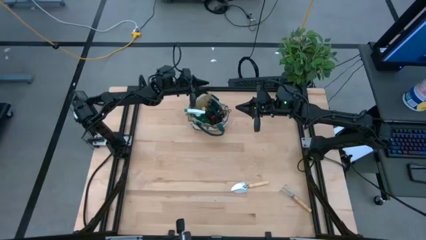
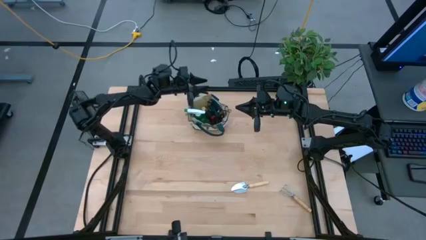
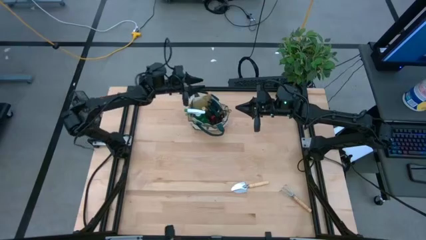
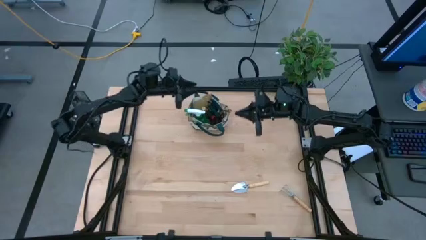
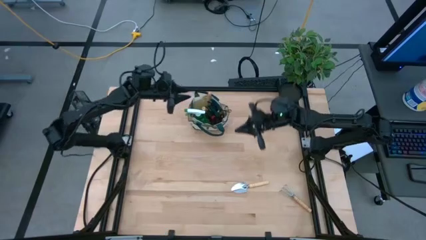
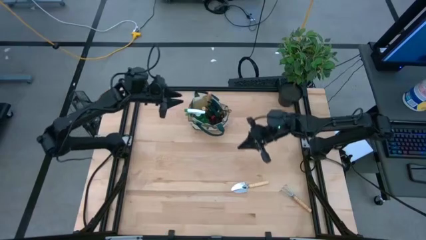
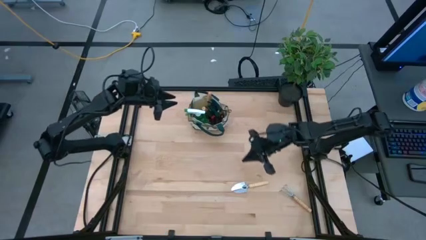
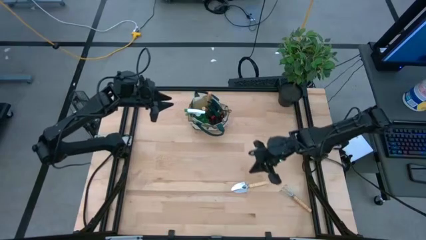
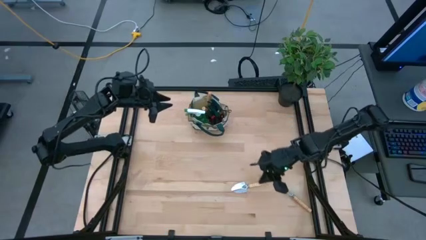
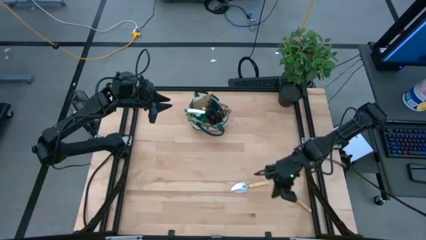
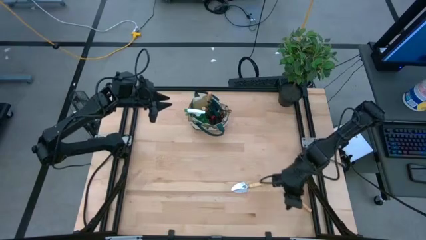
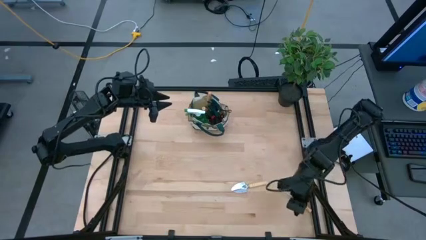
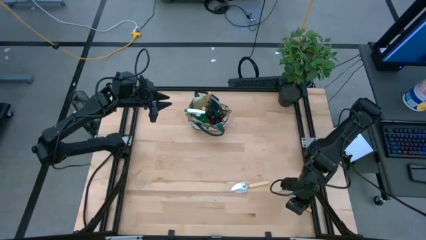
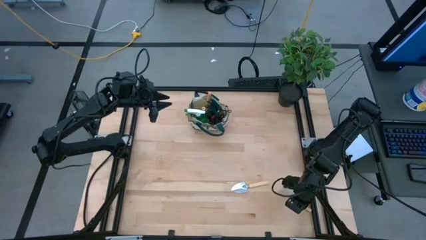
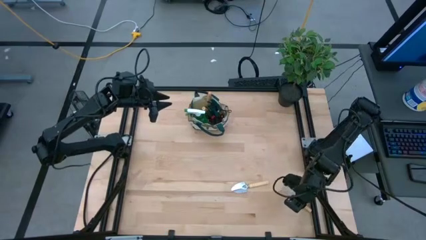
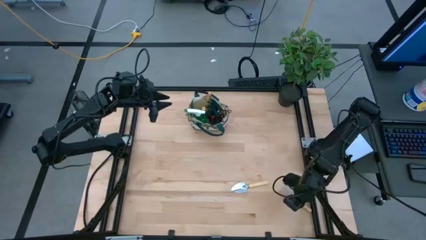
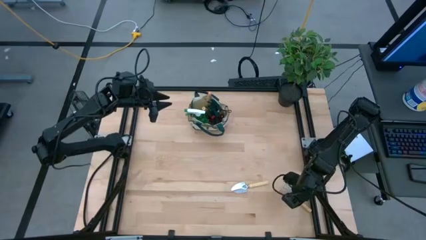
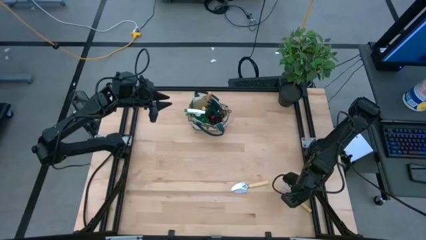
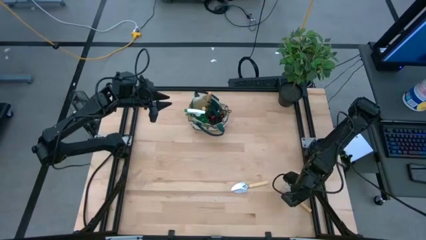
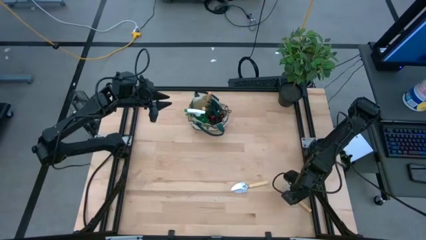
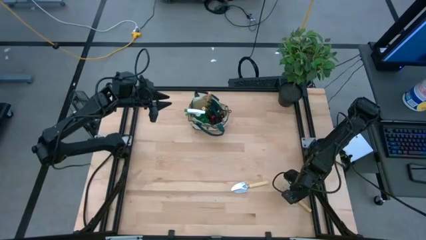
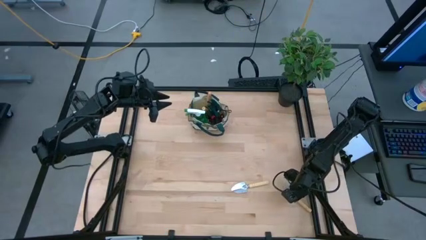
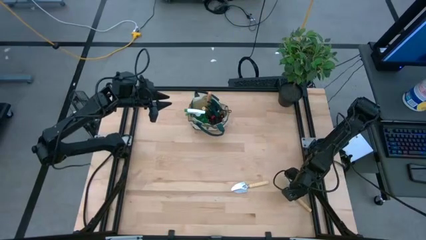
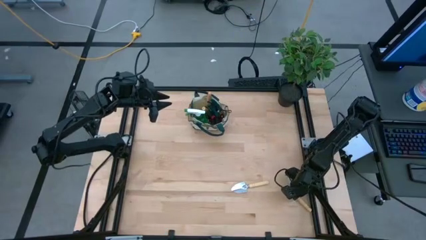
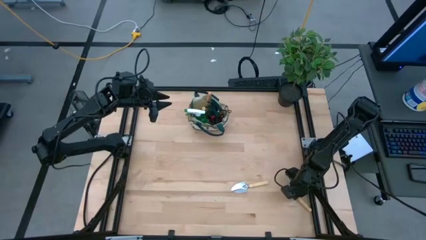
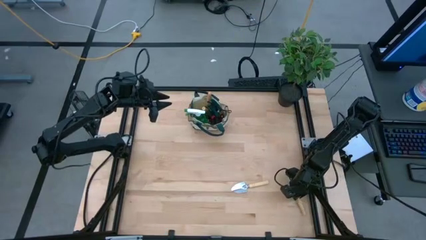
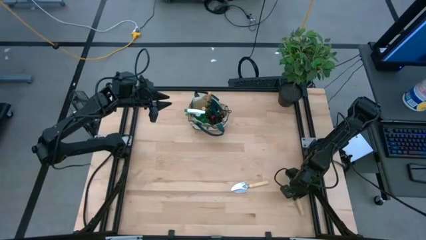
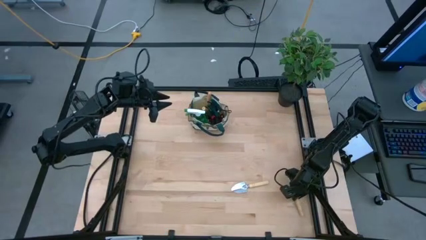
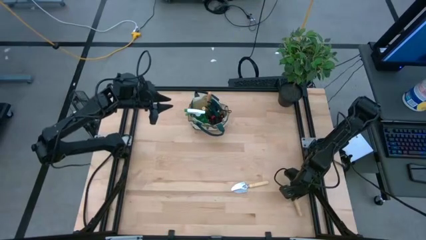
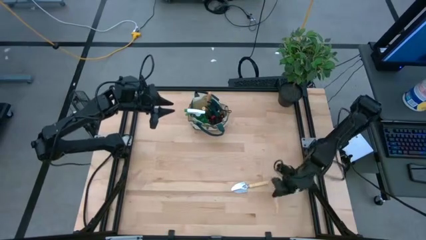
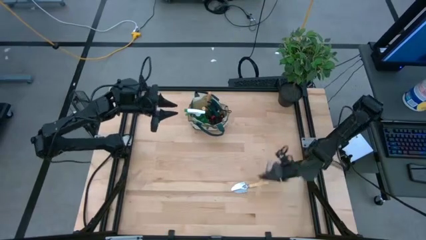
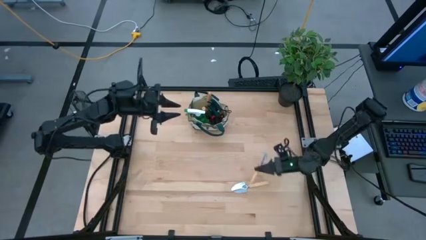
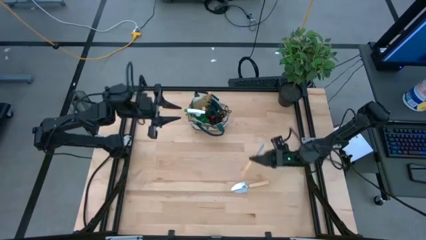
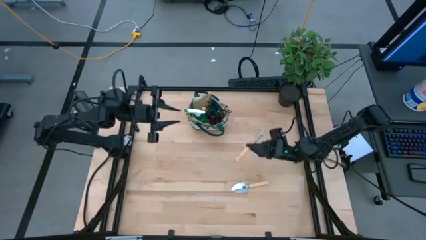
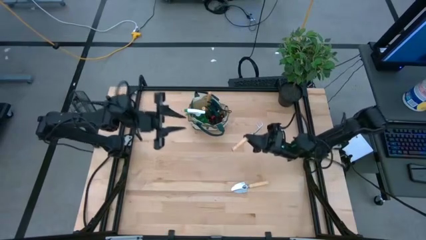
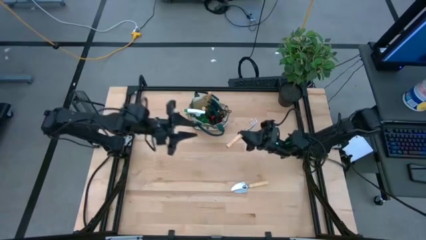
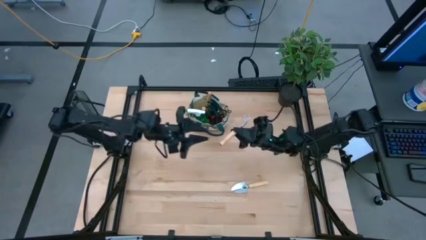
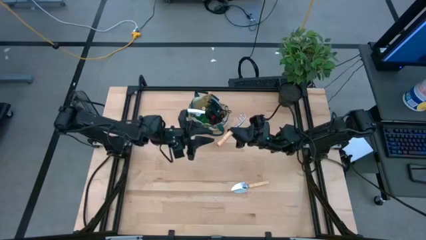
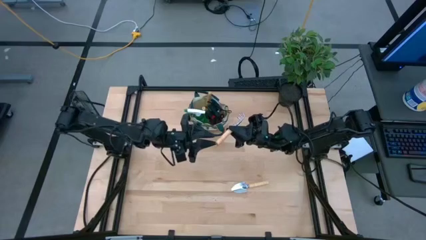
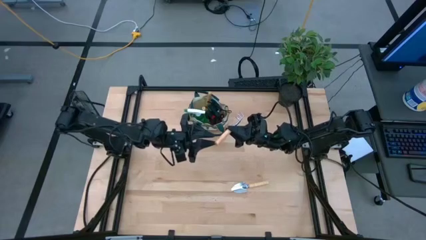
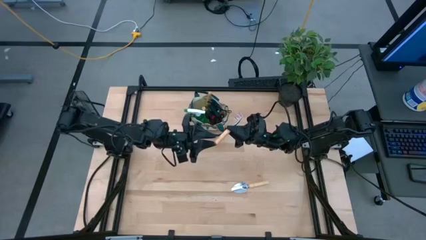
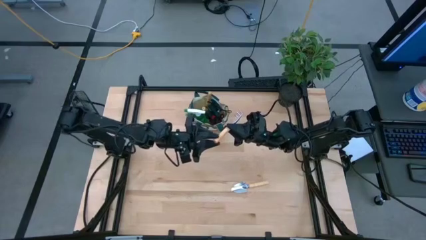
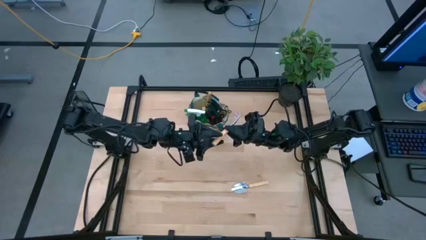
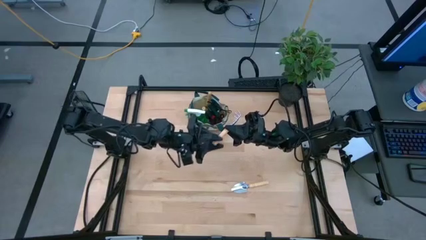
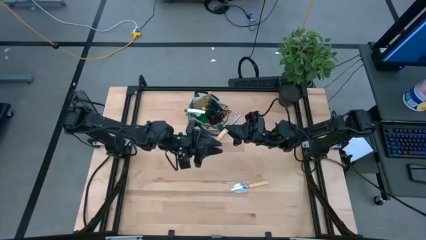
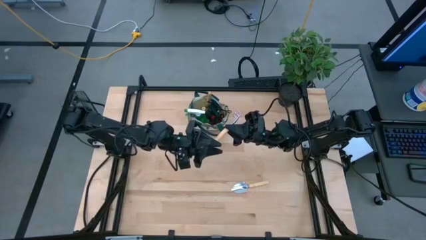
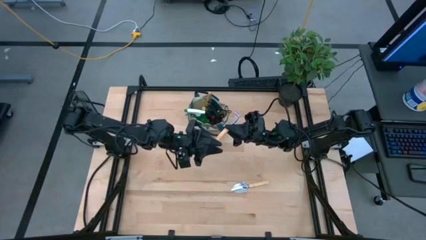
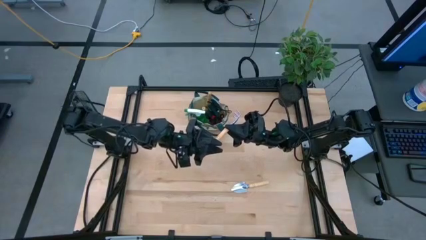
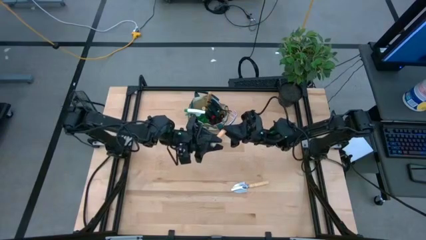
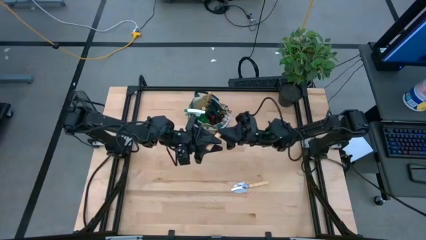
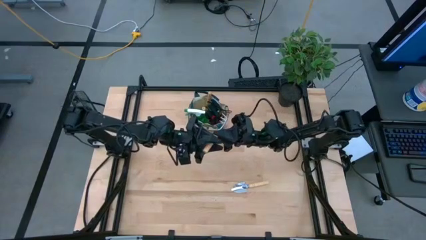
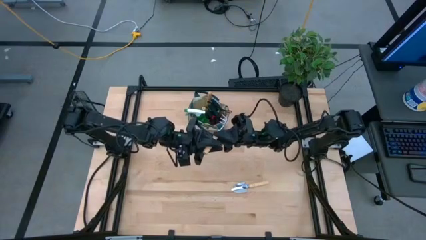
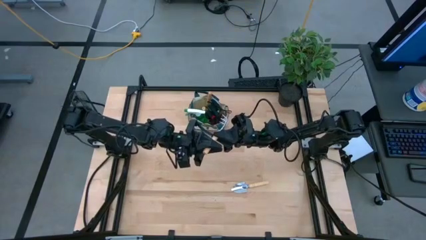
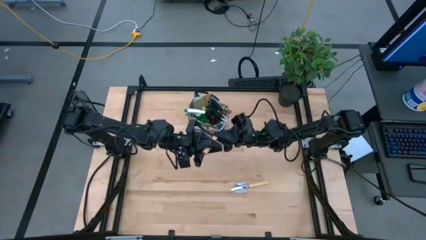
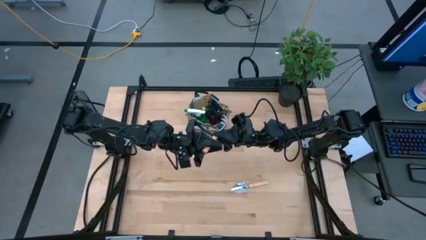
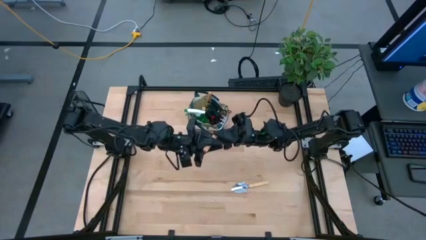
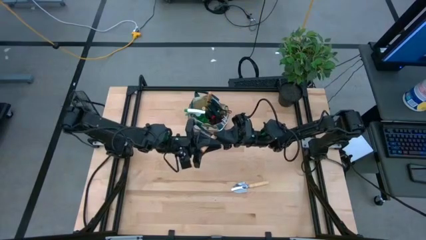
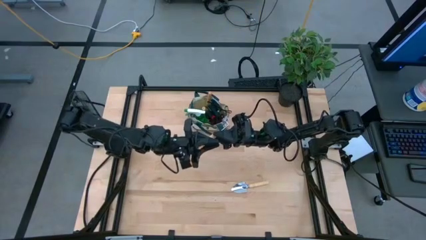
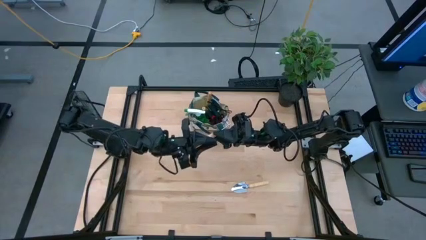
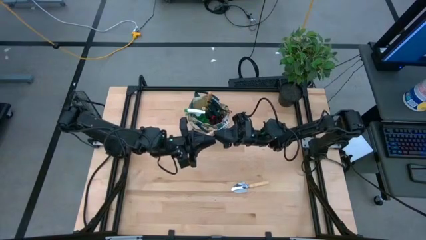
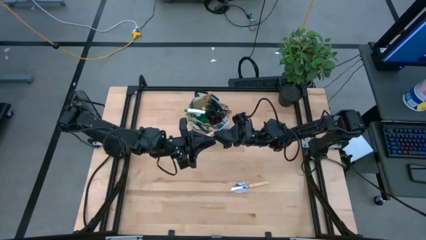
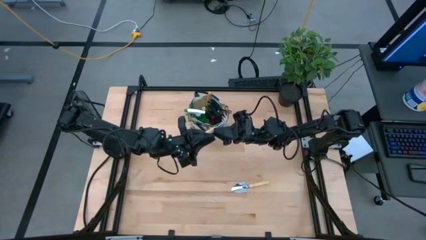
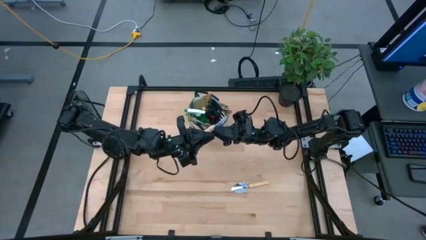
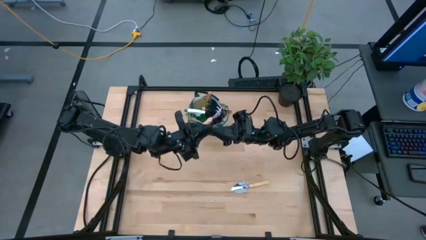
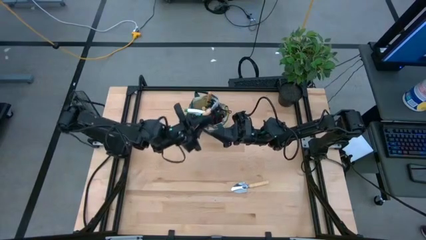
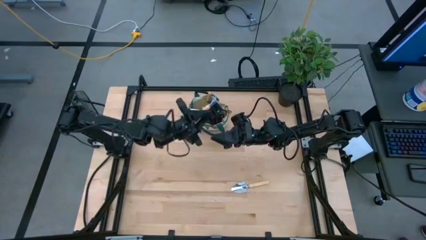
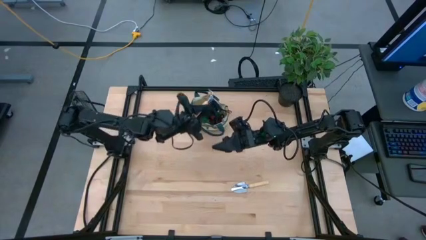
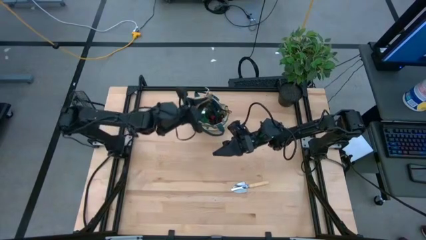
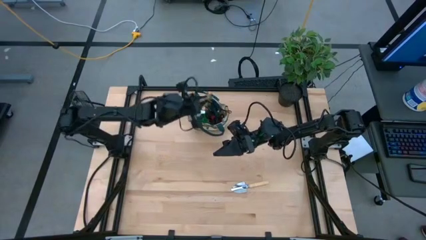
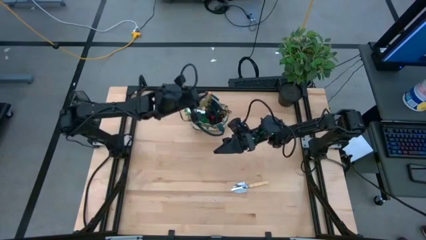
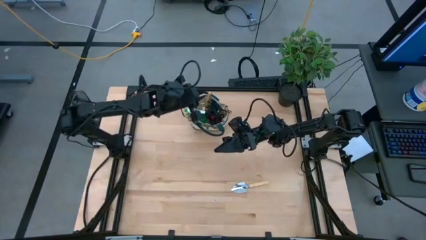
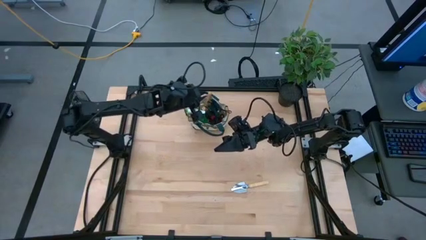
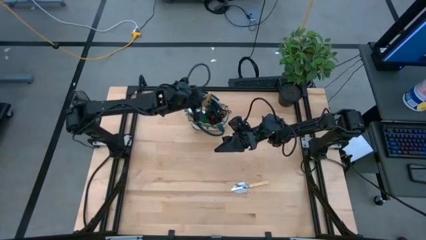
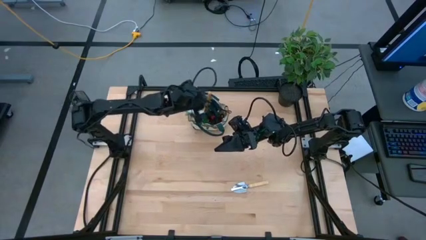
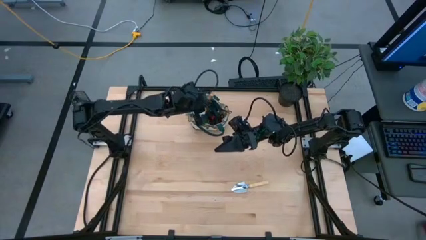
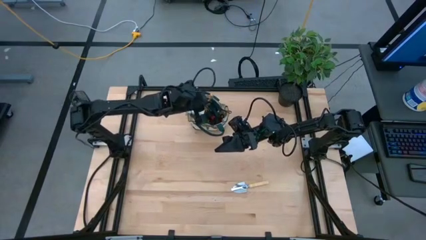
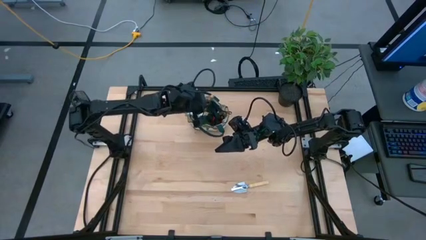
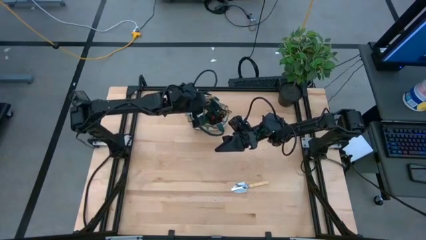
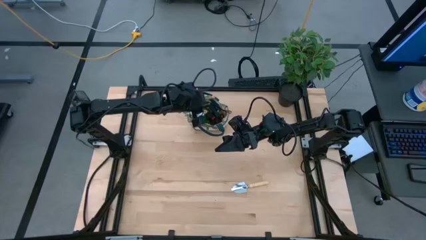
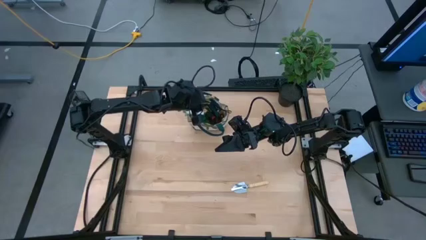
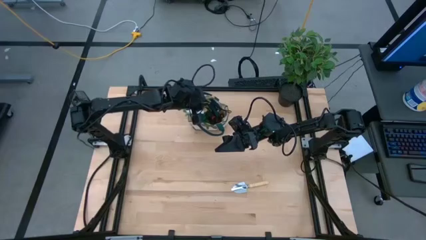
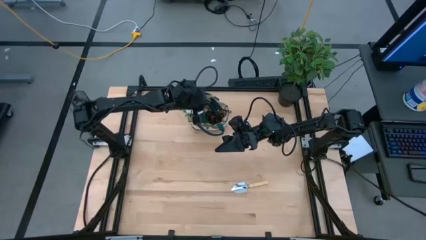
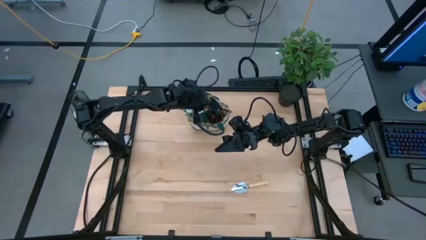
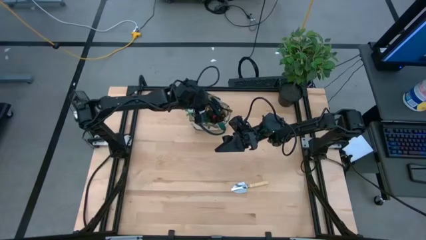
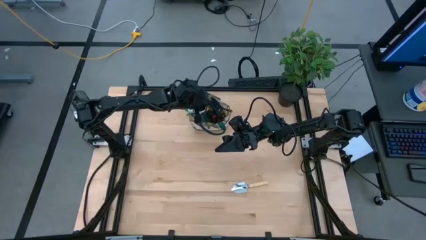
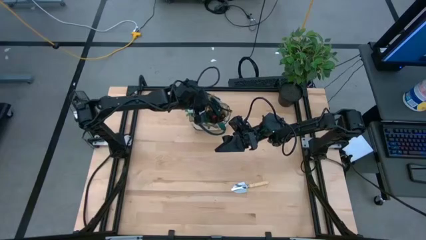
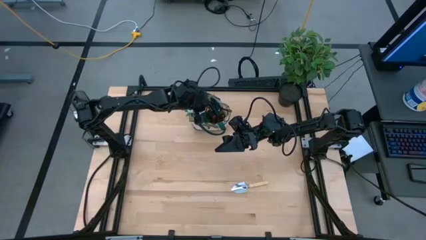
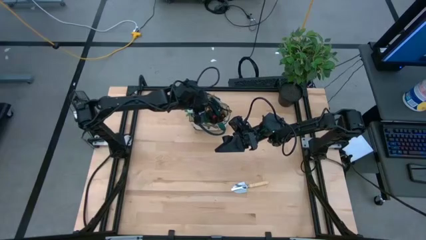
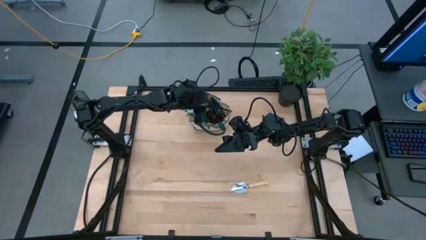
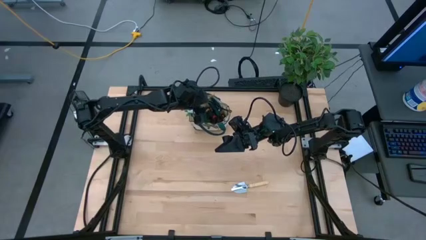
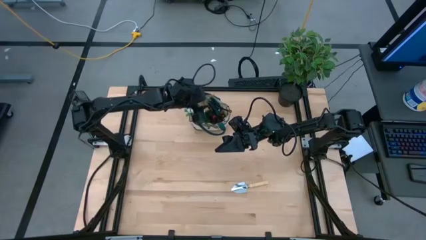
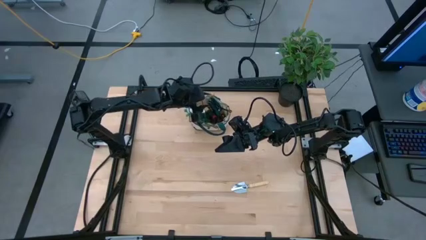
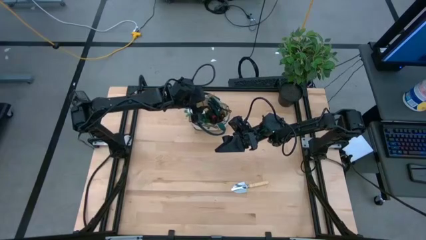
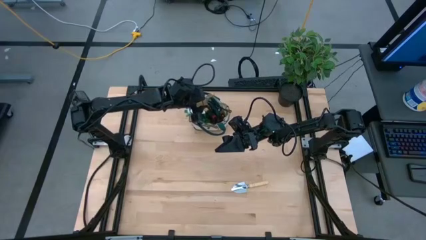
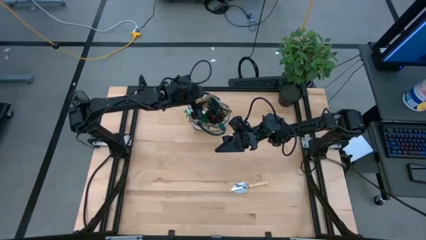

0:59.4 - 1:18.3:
Task: Pick & Place Garden tools in Gardening bag
Put the brown hand rake into the gardening bag
